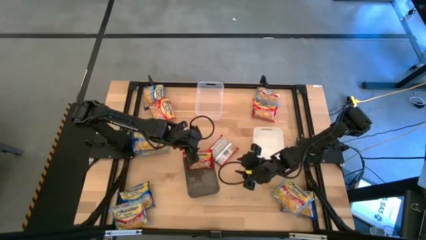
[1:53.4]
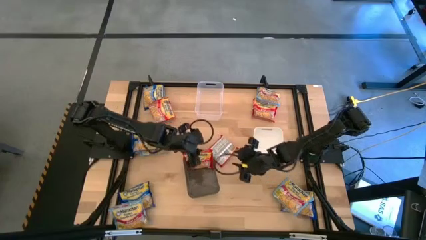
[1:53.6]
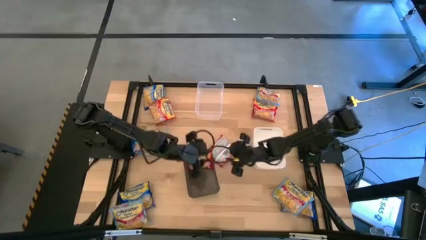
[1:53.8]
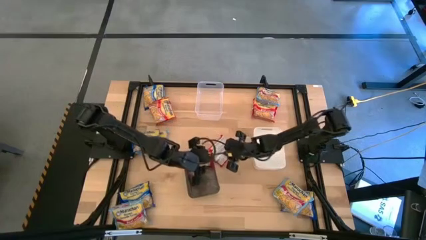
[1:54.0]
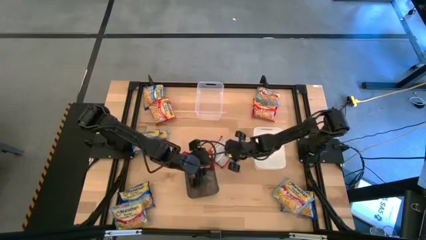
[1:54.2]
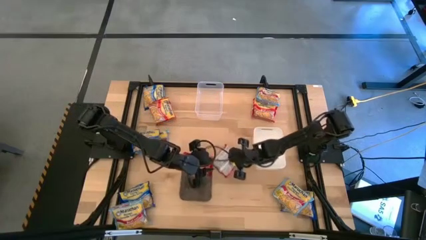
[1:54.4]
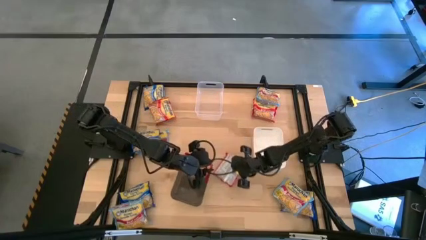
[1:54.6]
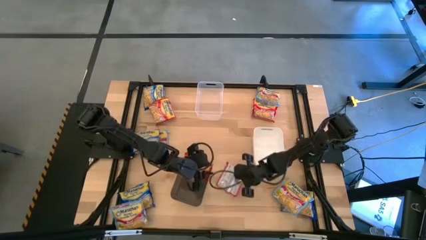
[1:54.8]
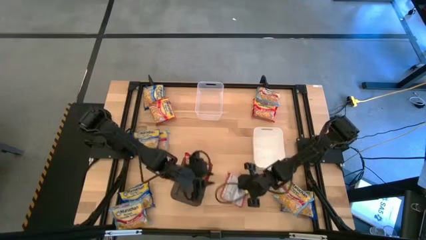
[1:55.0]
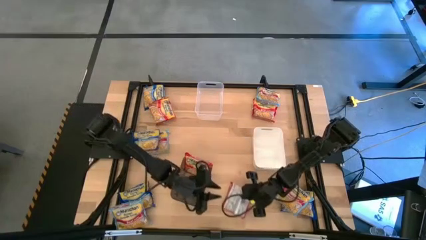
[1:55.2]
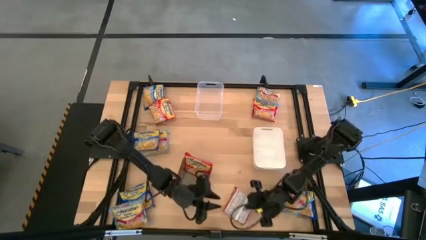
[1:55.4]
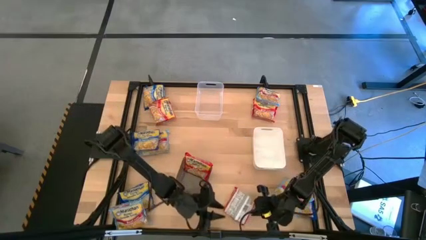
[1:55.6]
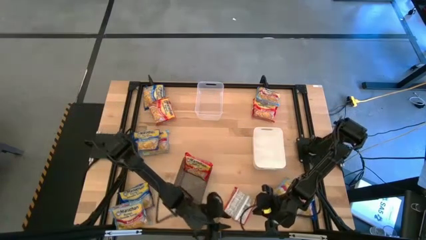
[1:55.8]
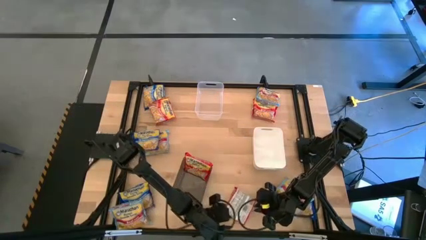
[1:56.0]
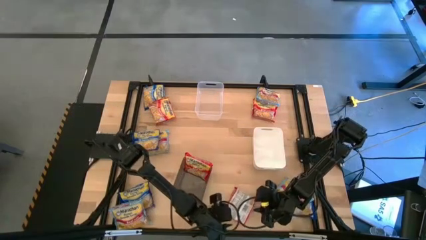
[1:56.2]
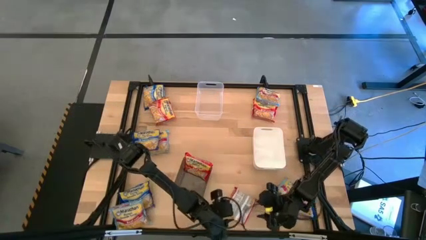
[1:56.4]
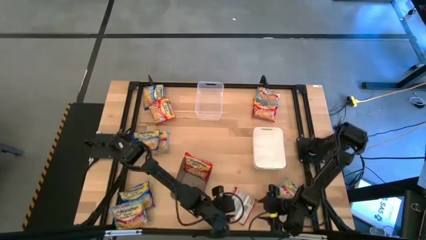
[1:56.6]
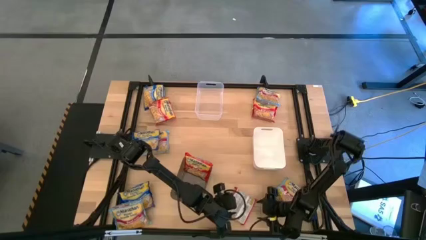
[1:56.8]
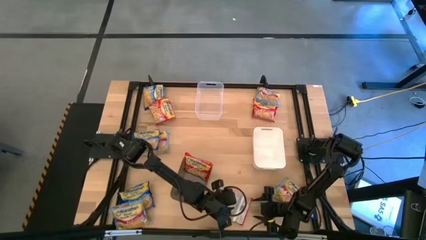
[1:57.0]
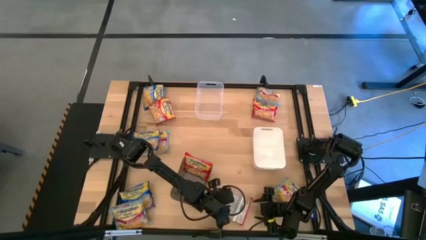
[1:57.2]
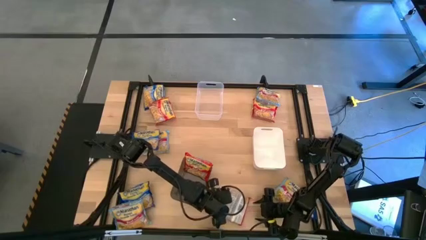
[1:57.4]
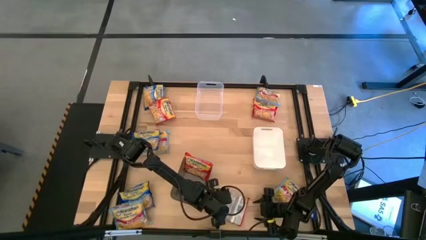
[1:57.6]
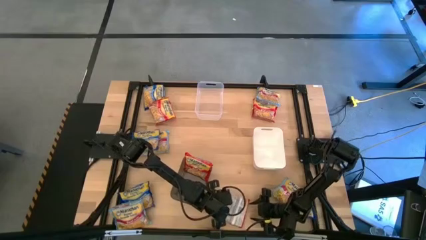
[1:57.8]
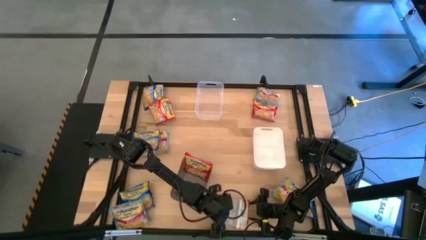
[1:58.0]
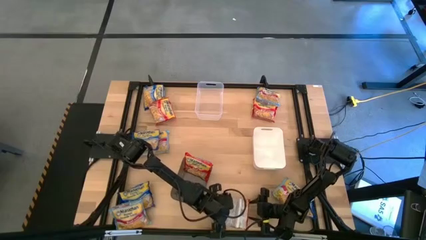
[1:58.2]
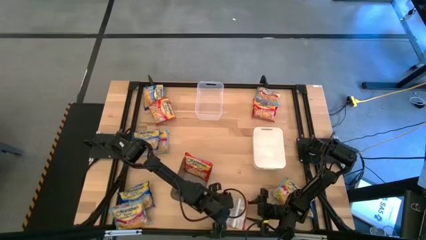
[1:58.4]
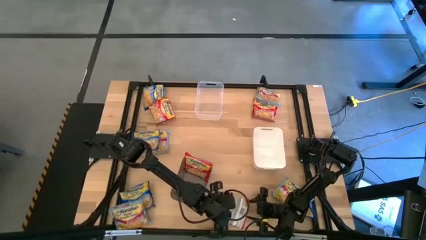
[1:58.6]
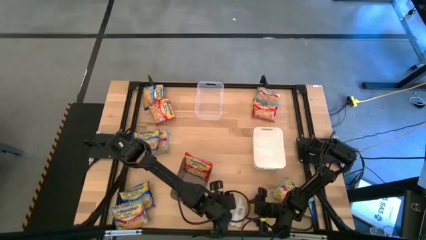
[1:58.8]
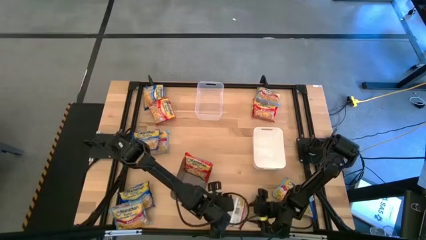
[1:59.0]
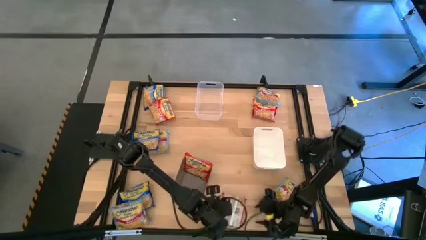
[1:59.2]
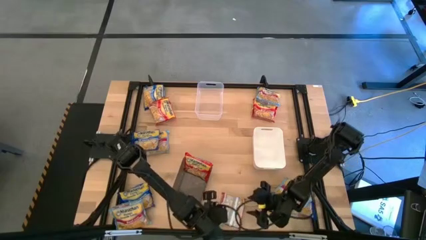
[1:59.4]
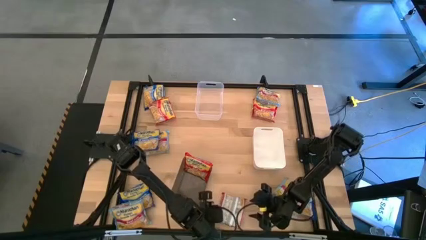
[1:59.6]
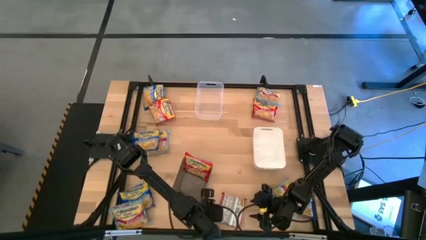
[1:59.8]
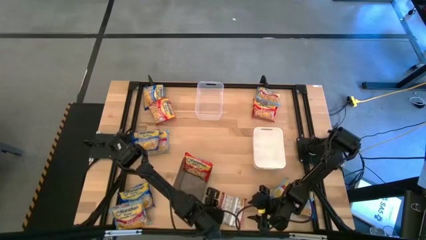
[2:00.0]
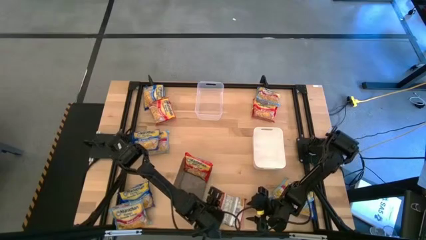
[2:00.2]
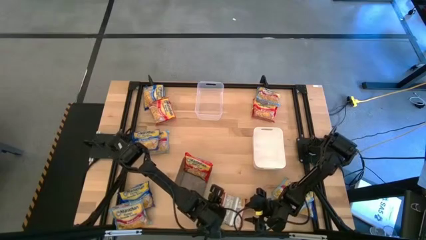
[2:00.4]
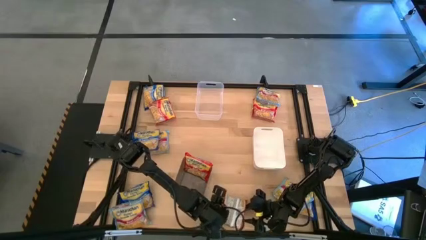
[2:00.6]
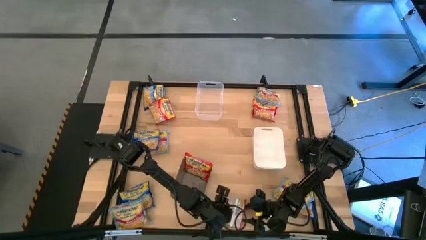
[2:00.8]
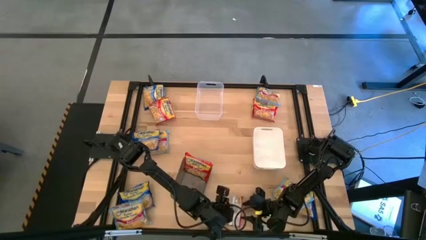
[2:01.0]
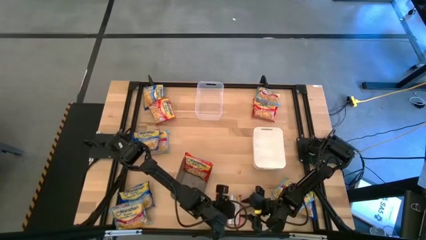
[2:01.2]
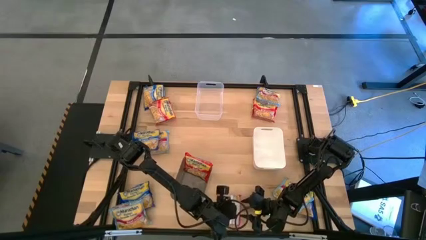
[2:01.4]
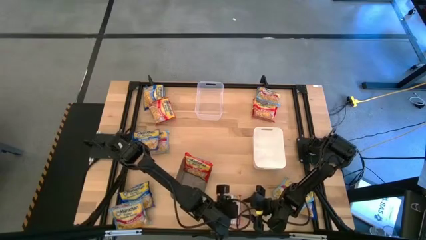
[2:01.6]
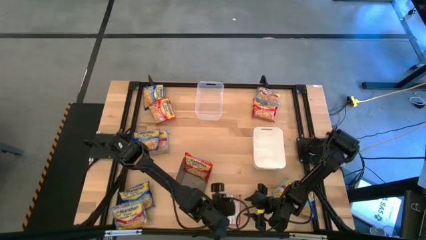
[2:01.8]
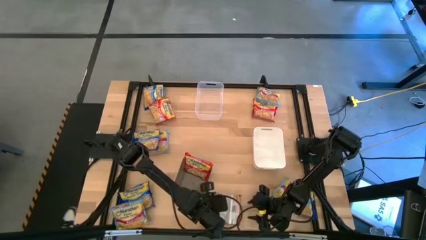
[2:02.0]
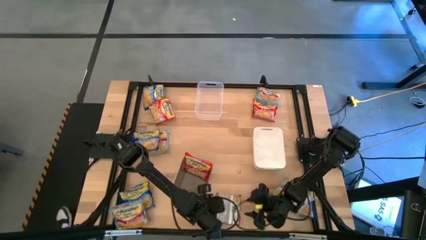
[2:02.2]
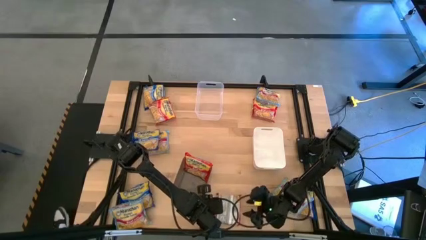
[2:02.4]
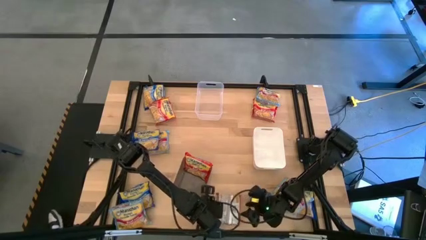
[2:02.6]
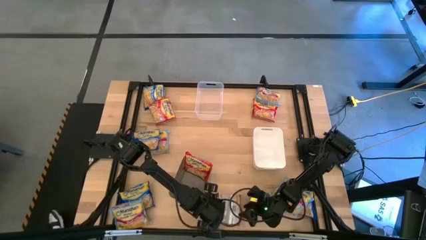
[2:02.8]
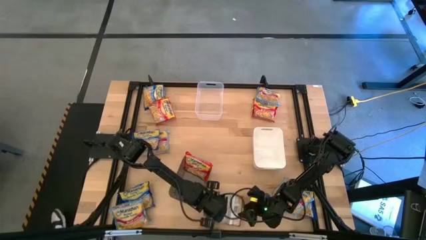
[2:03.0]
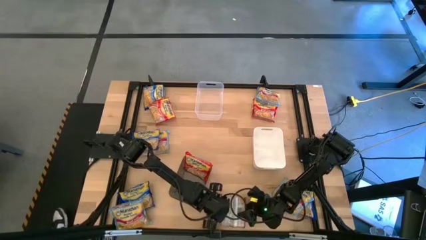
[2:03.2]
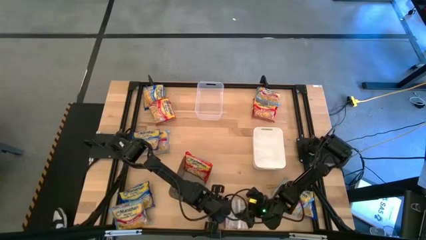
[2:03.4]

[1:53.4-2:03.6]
Task: Sort Maruchan noodles
Put the red noodle pack into the gray bin

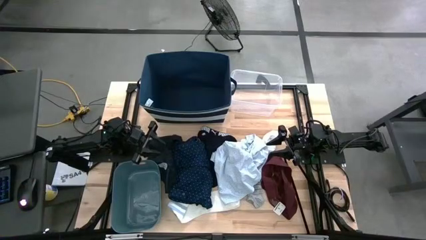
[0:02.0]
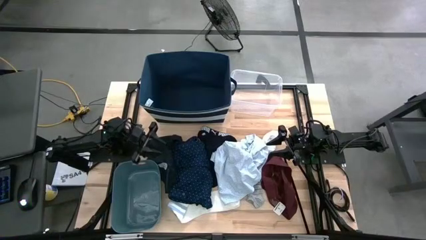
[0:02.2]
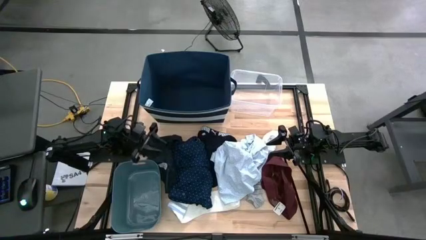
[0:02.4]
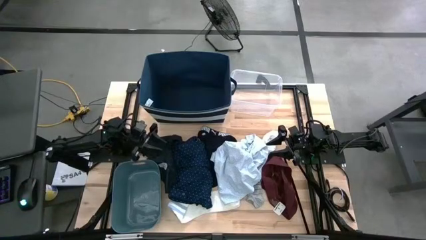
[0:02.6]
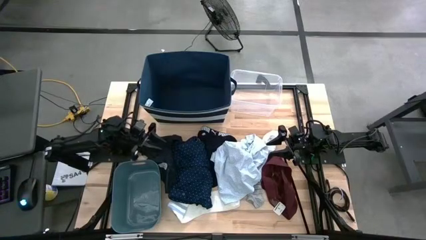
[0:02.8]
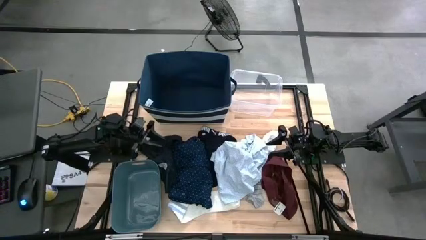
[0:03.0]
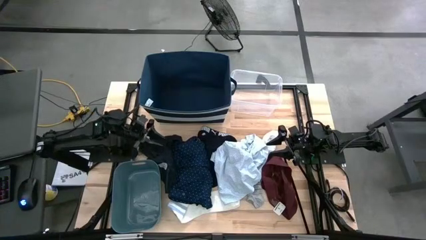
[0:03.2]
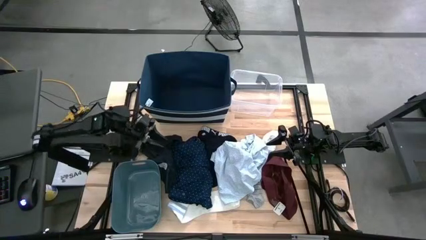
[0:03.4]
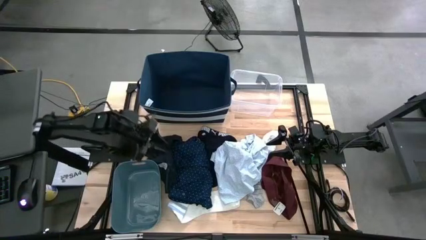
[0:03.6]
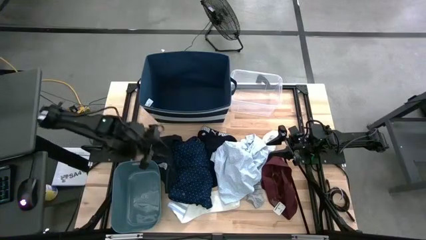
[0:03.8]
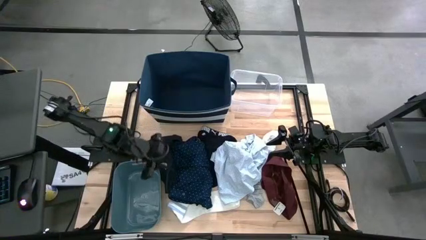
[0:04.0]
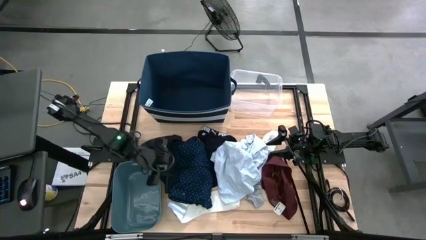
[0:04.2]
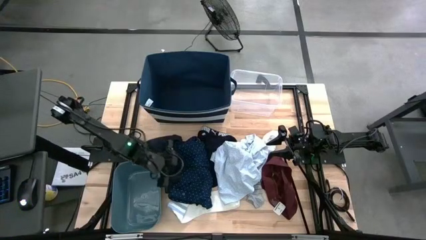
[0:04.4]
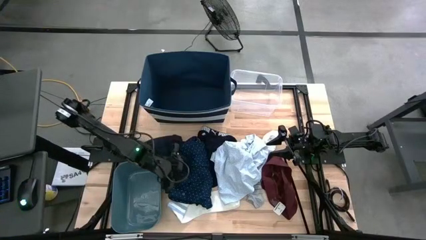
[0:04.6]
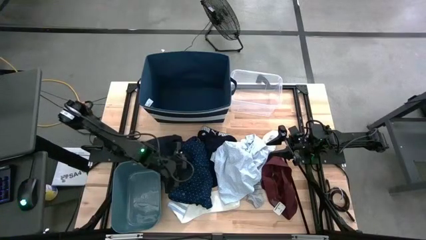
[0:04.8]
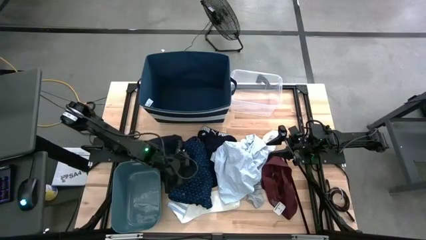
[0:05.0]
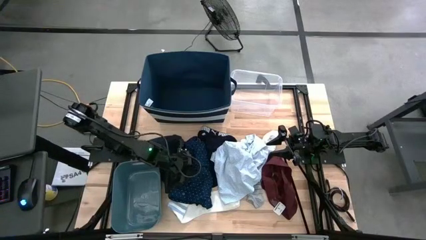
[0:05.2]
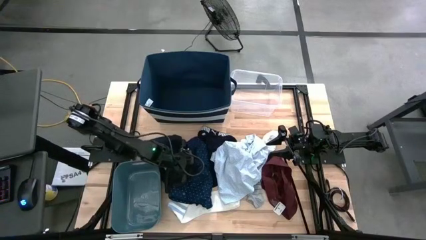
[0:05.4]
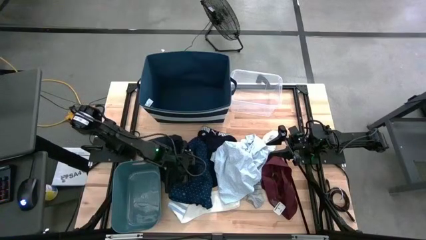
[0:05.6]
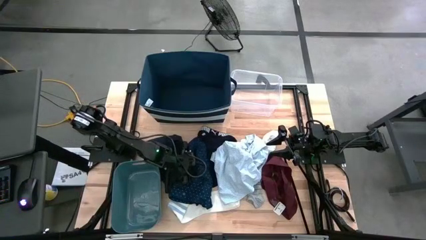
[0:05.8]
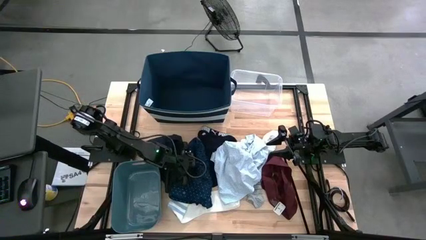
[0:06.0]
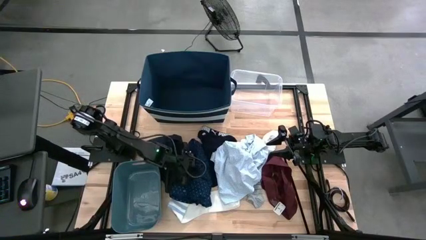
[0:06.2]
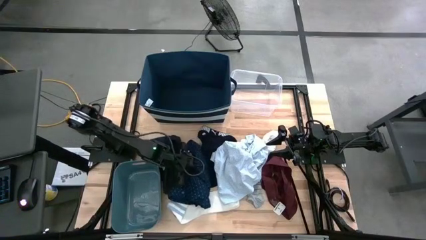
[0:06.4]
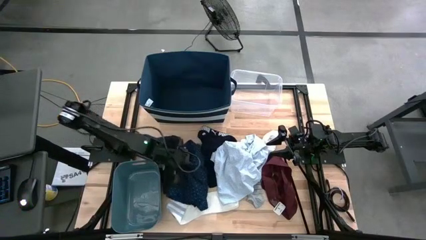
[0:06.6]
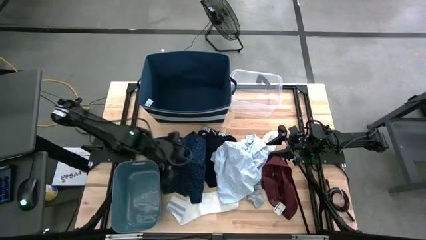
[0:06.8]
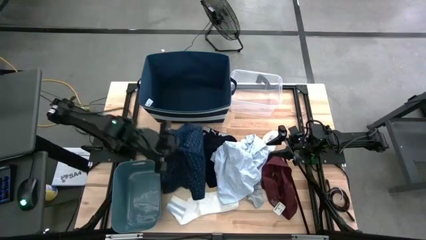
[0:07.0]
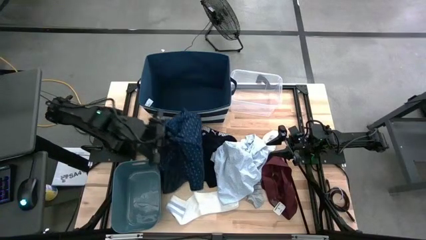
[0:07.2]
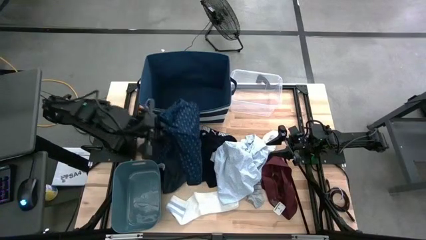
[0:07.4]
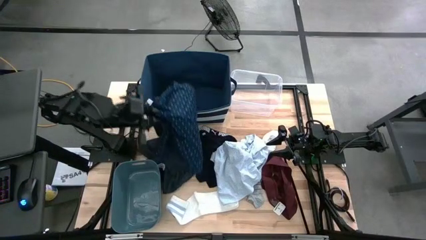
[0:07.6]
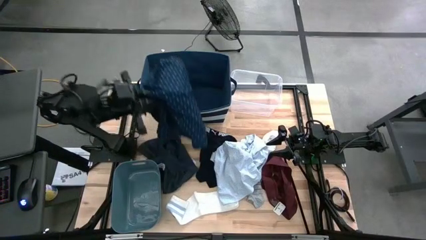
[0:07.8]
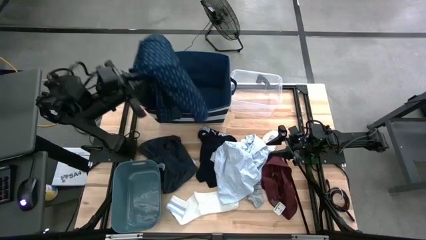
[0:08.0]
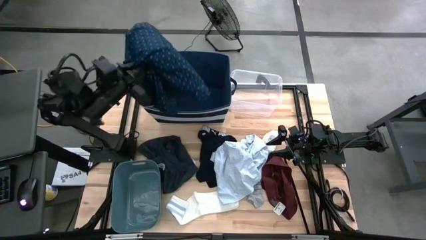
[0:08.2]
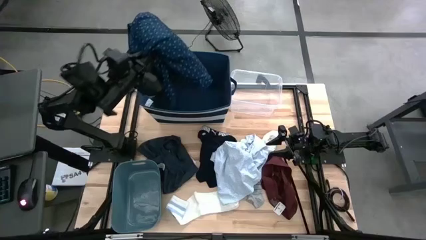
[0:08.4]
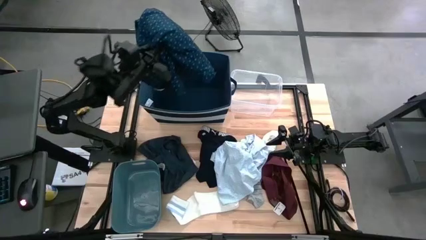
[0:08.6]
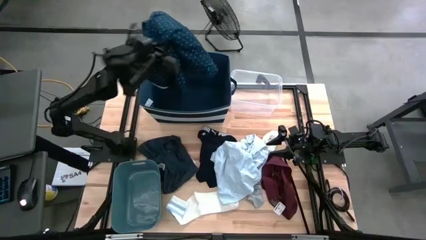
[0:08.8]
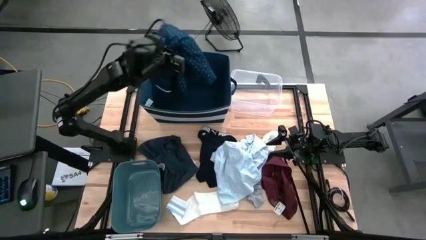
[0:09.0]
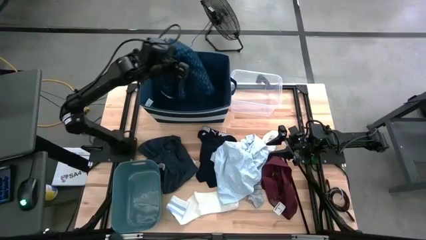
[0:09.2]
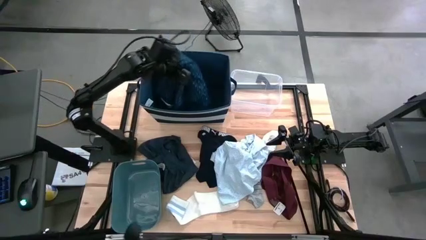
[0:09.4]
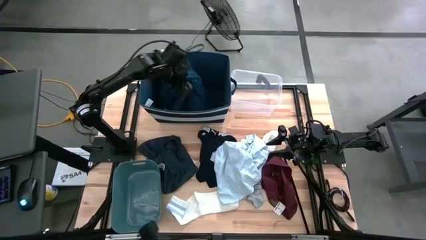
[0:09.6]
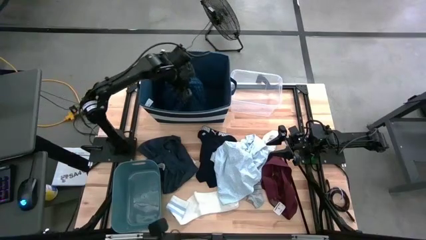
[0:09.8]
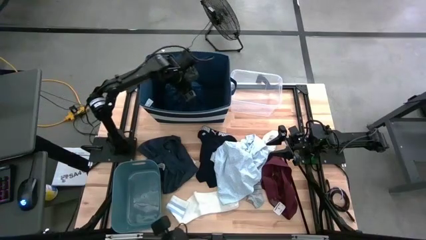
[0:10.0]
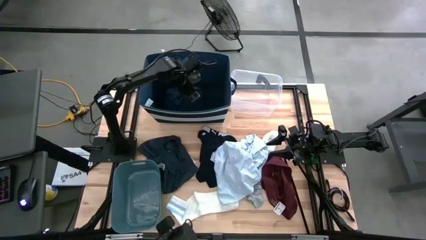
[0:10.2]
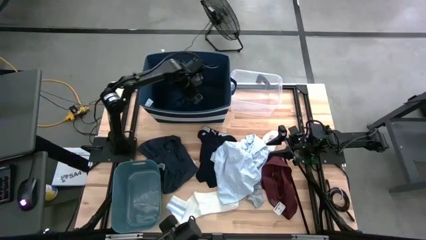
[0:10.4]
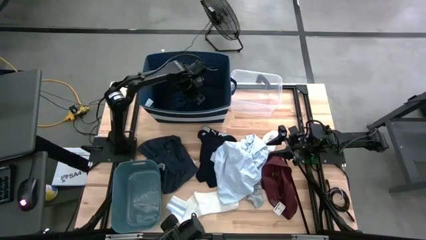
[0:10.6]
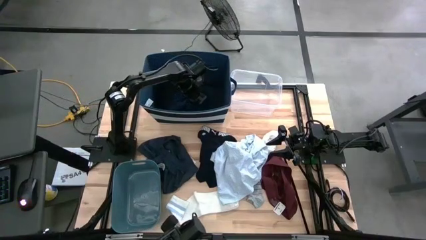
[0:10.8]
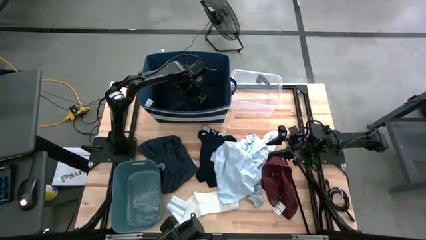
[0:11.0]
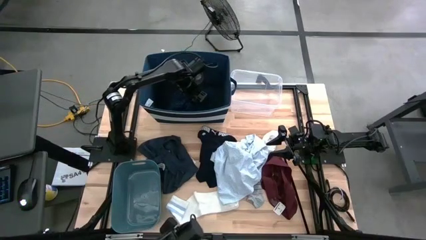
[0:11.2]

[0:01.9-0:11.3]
Task: Pick & Place Cloths
Put the blue shirt into the blue bin
